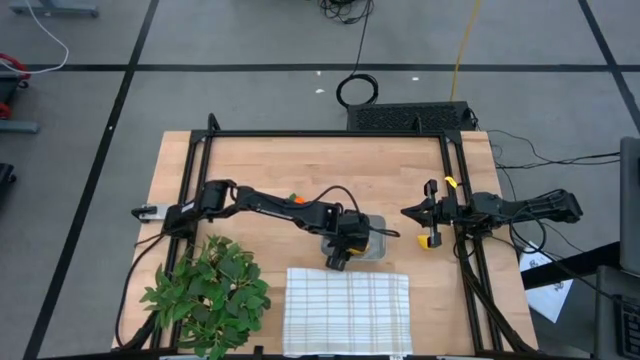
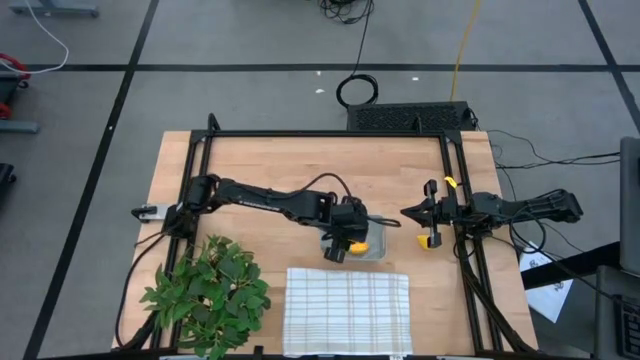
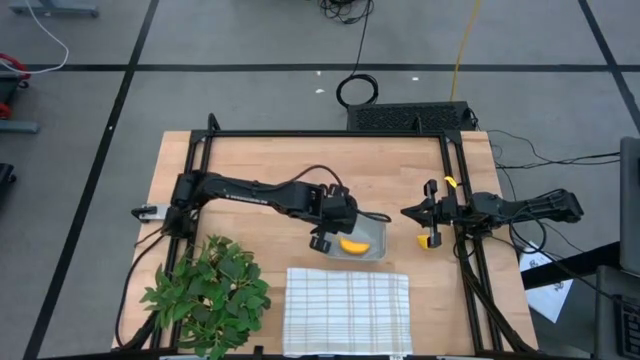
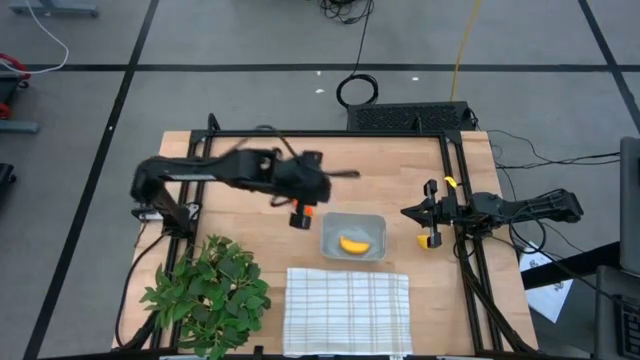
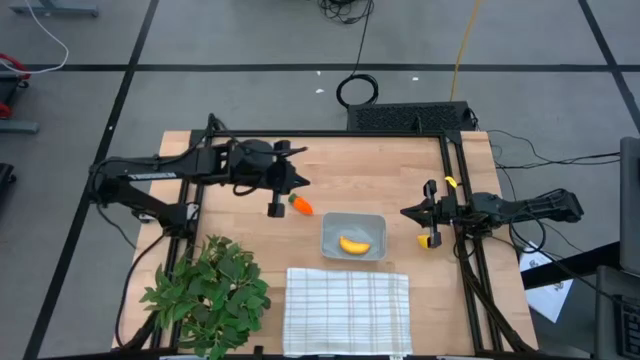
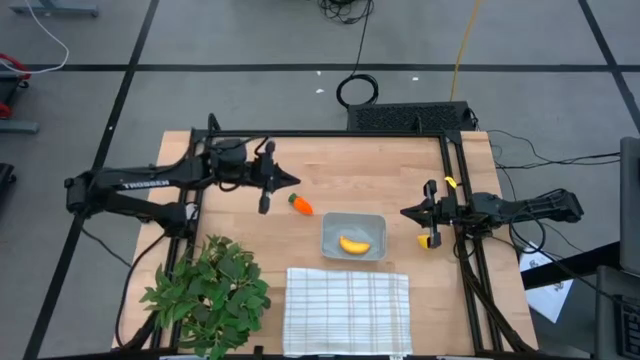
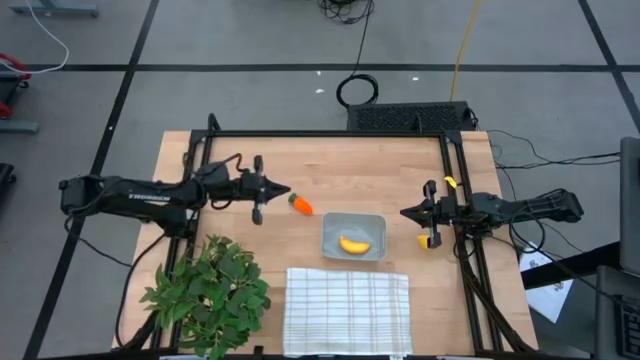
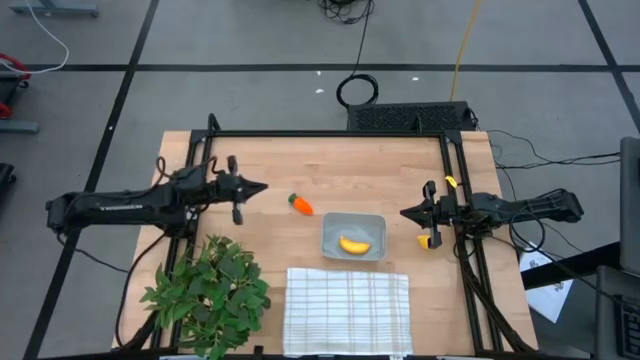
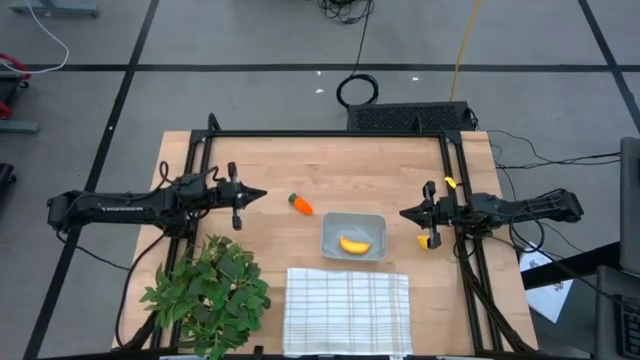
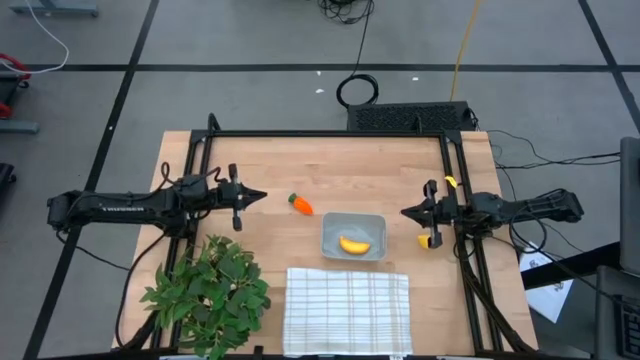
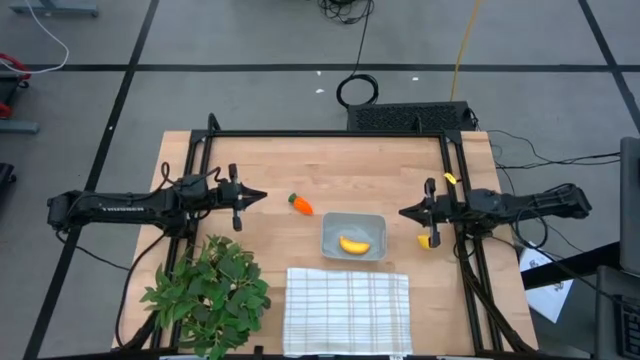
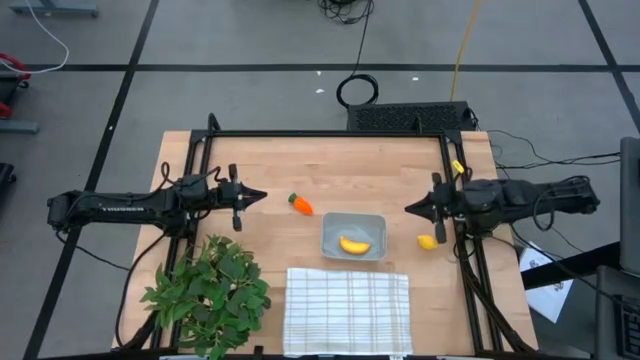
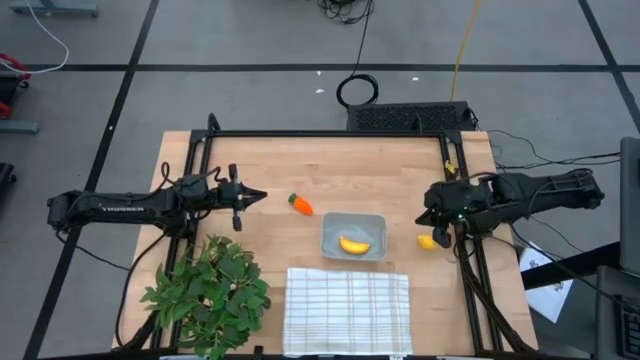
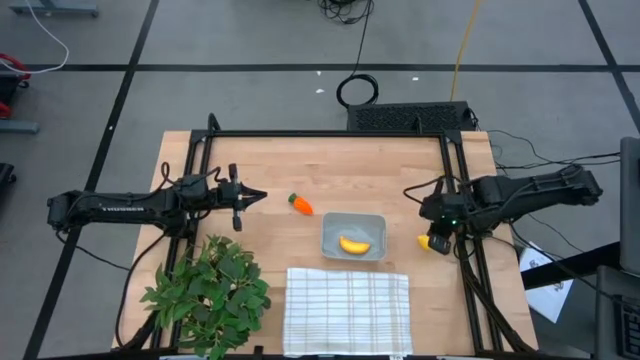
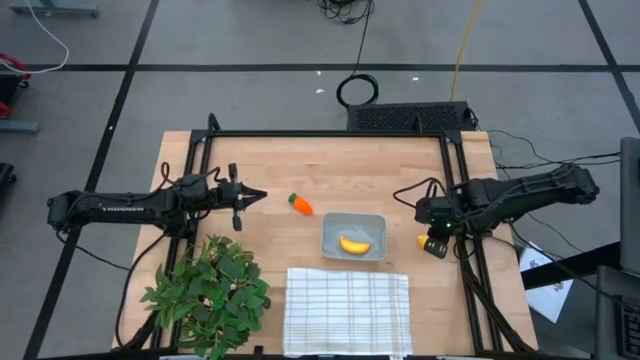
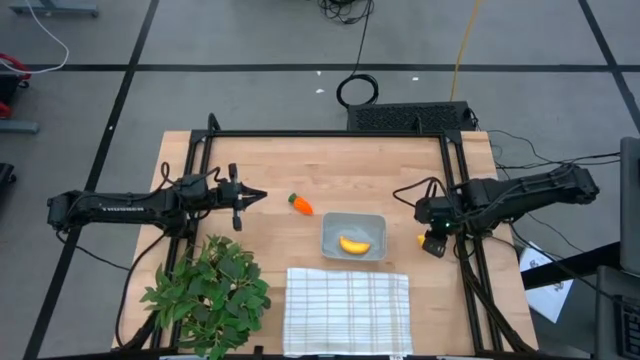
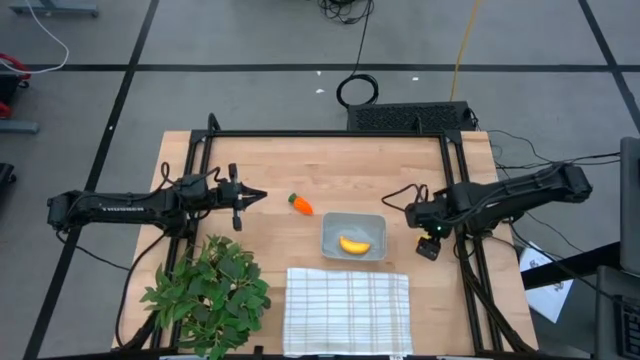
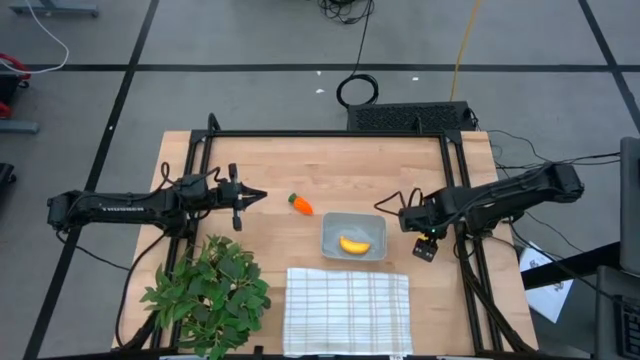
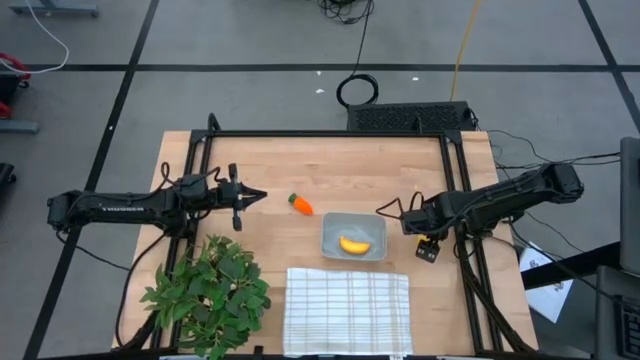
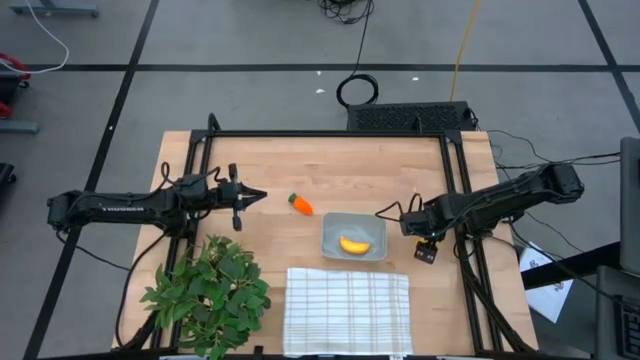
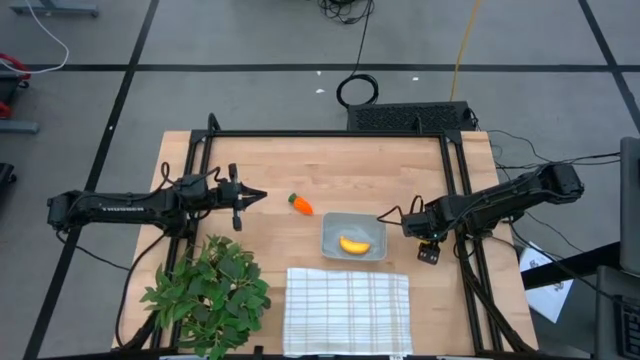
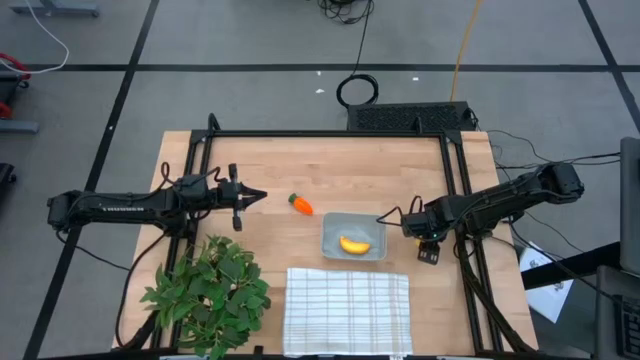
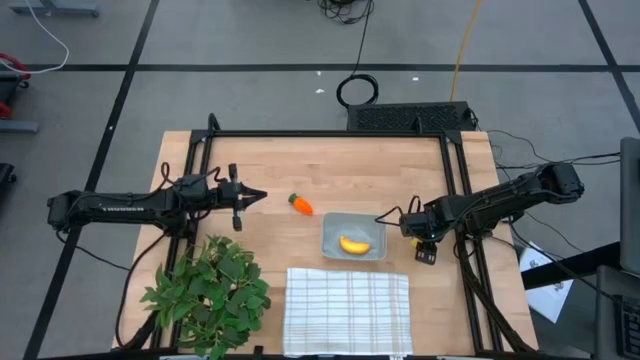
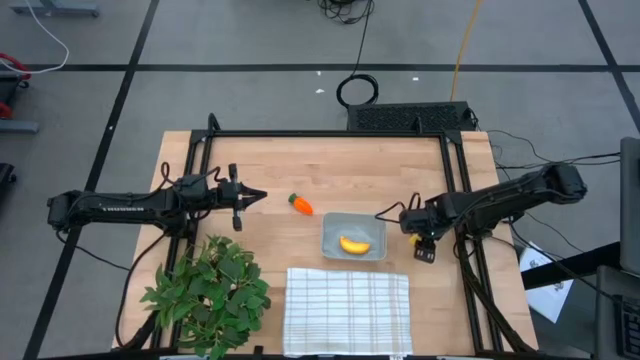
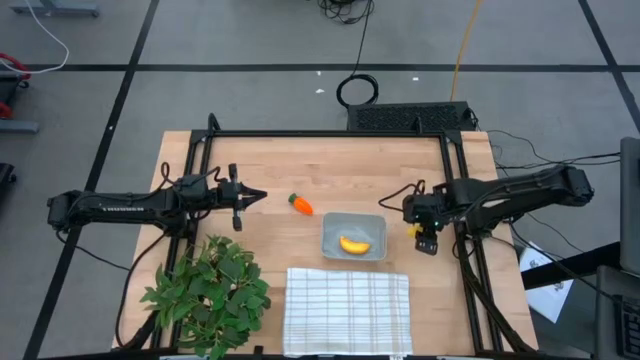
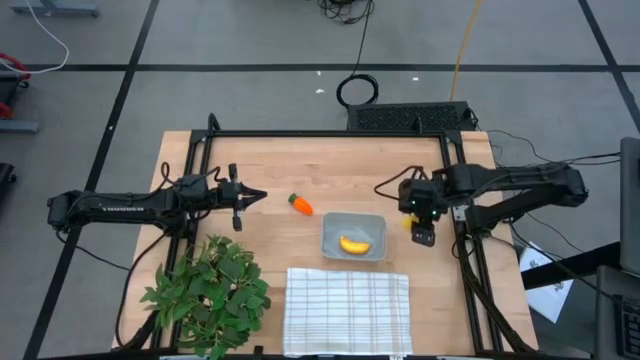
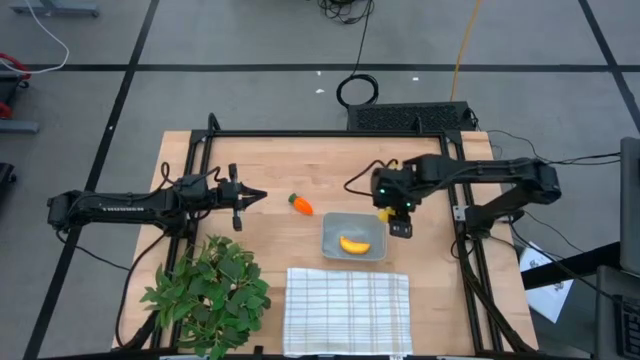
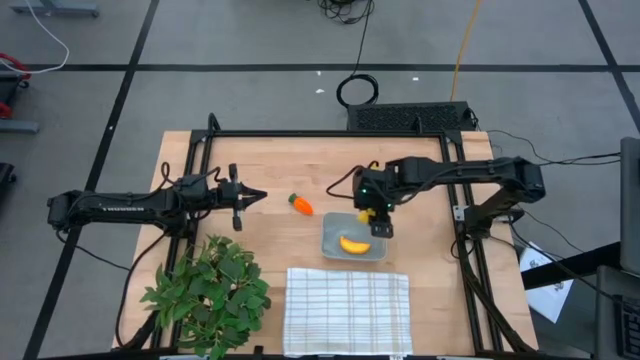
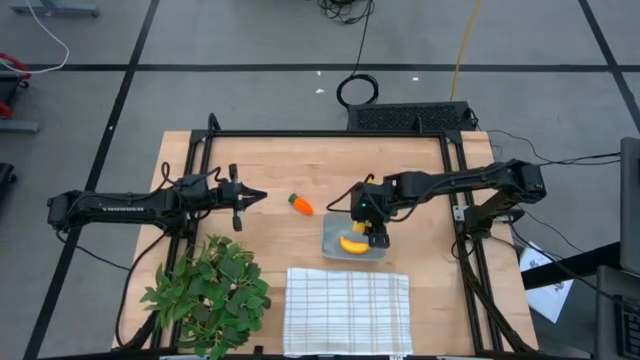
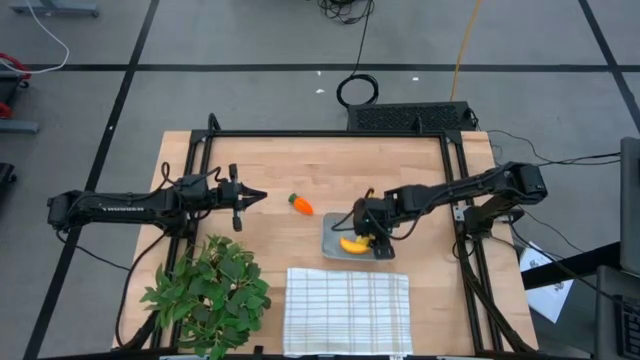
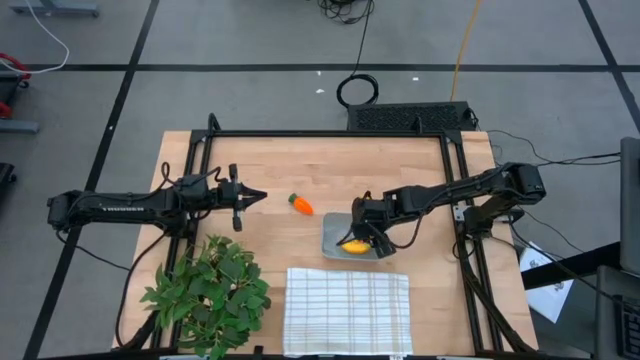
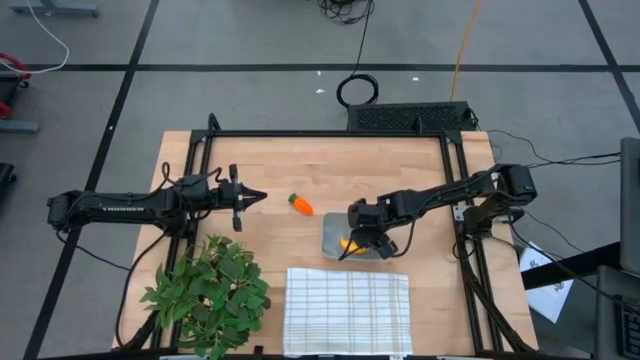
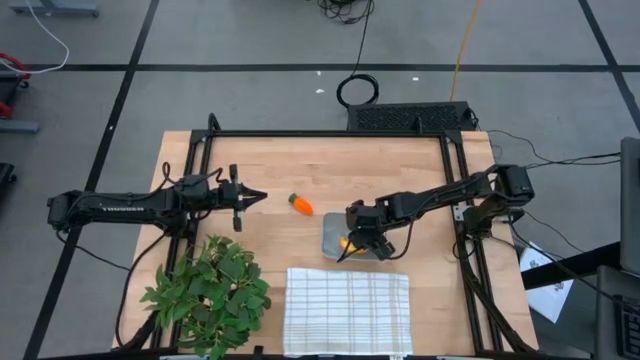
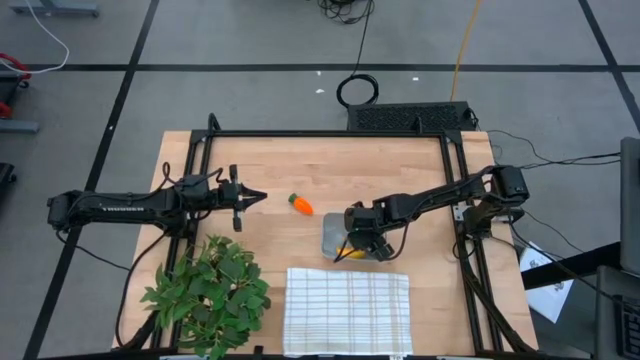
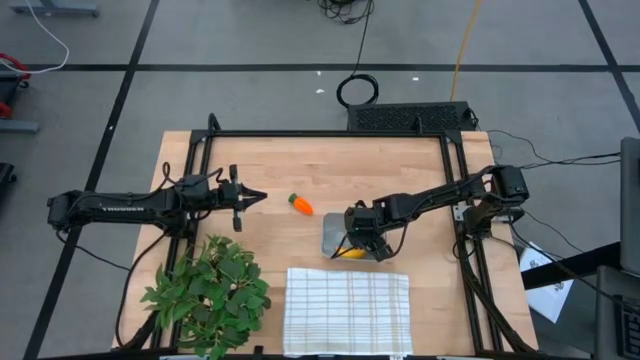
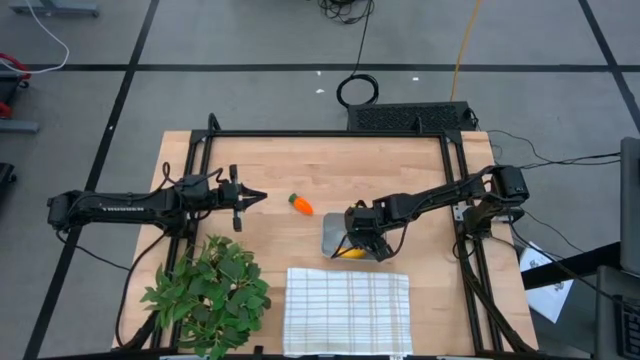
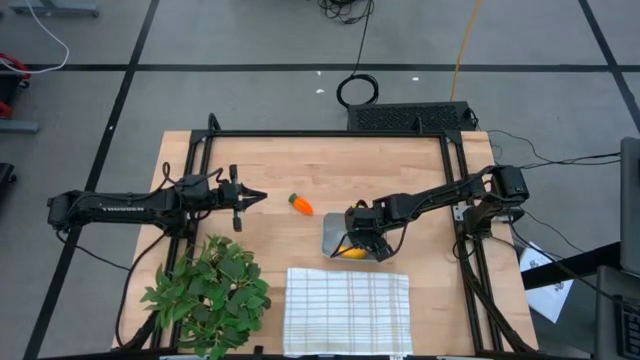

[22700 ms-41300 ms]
Task: Pick and placing Produce into tupperware
Put the yellow lemon into the gray bin

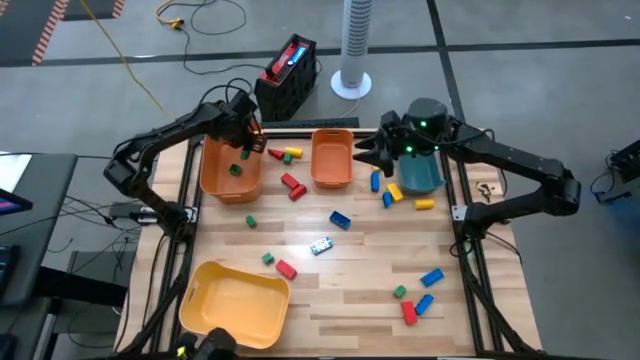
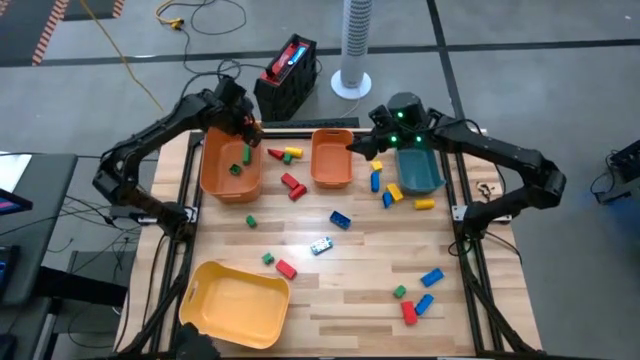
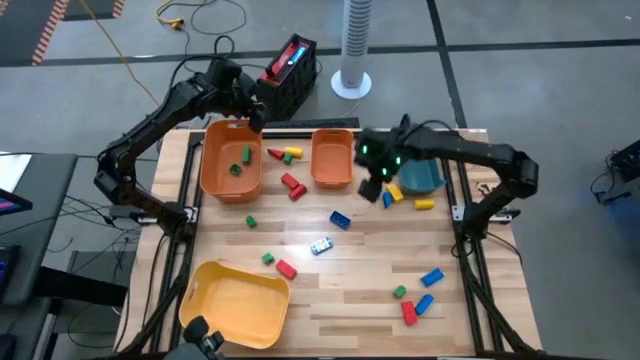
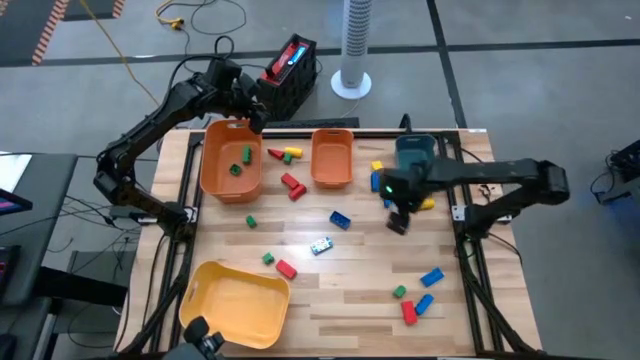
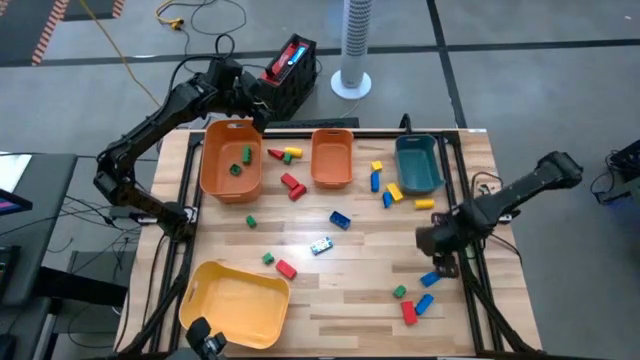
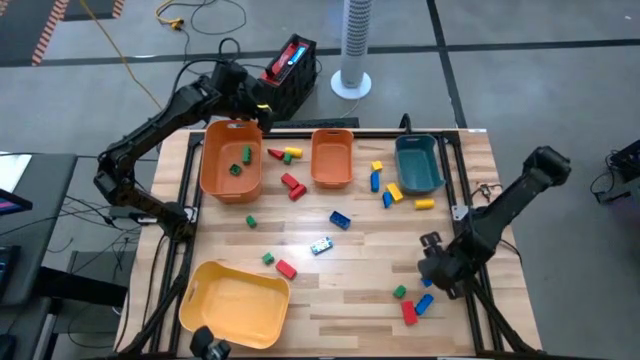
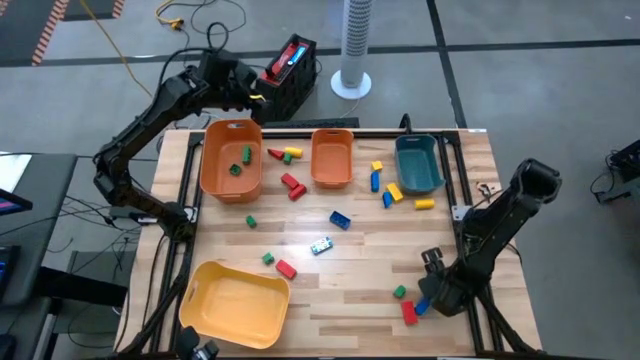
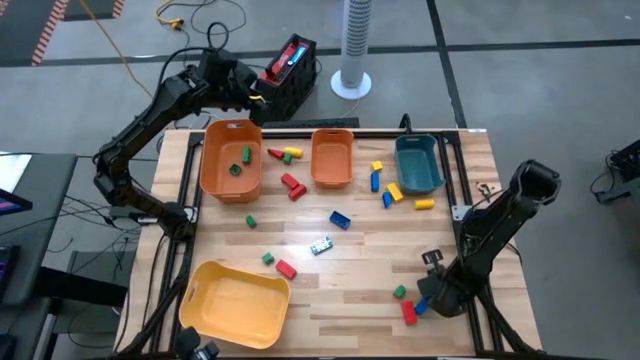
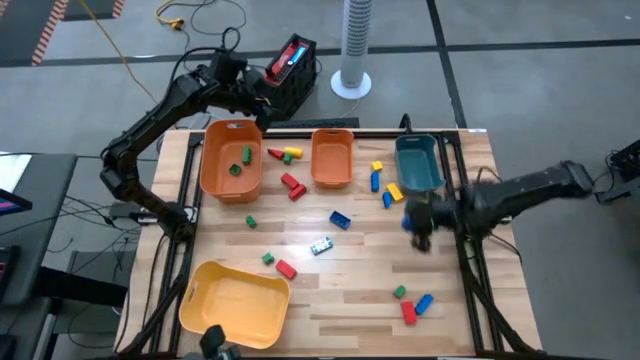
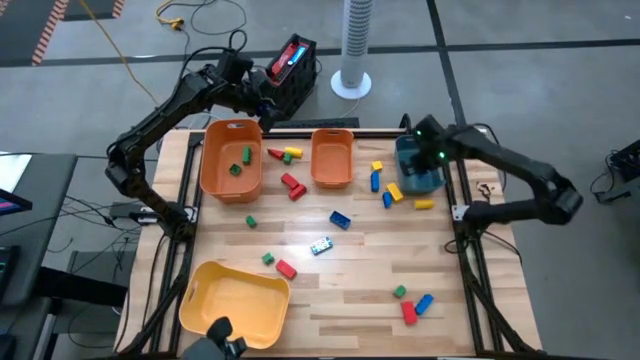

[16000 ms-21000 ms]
Task: Sort blocks
Put the blue game piece into the green bin
